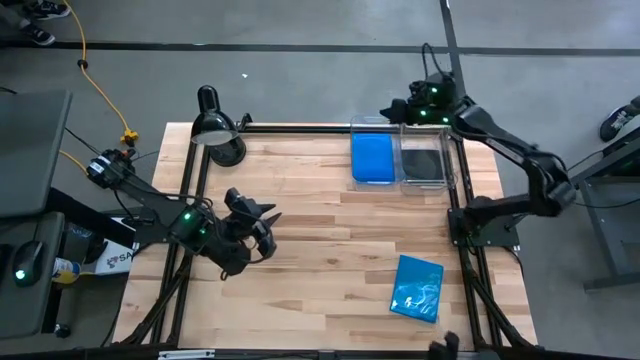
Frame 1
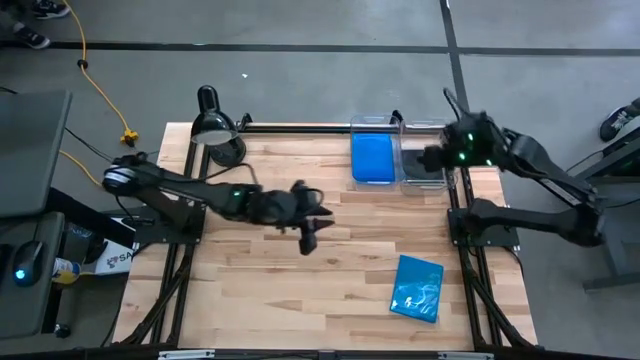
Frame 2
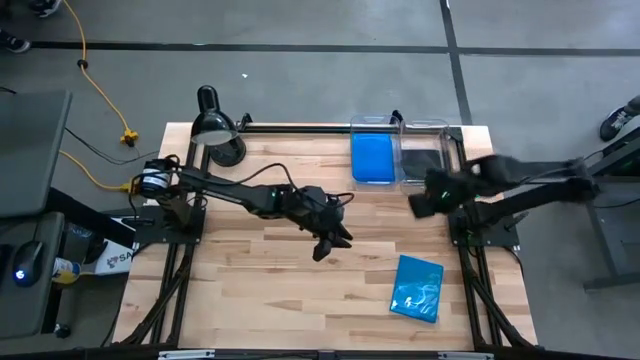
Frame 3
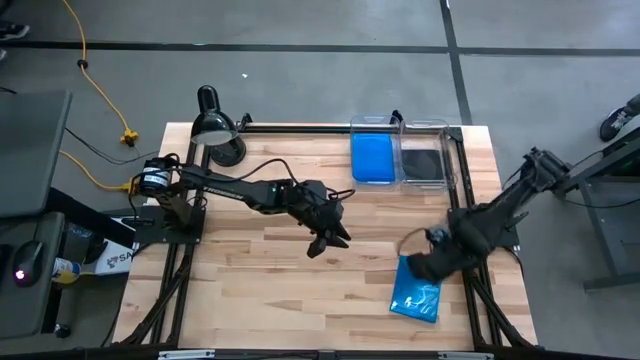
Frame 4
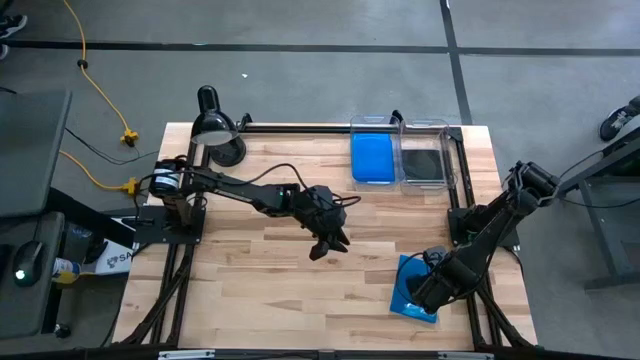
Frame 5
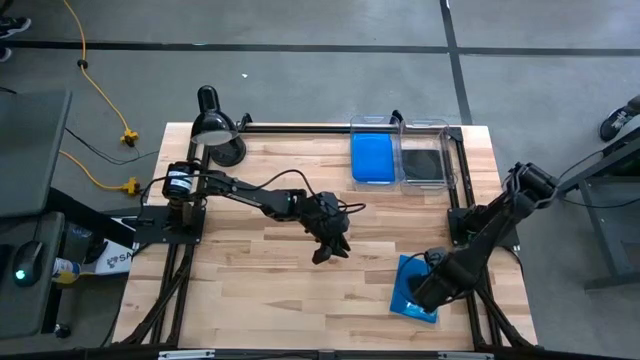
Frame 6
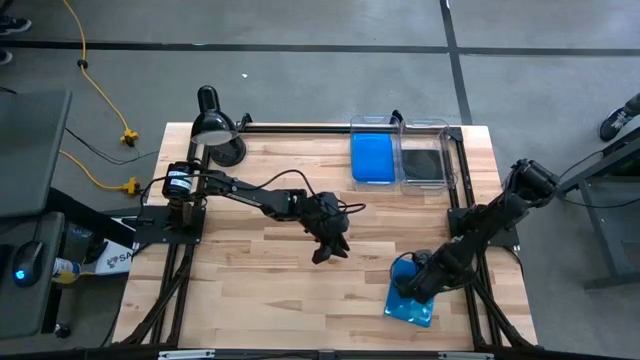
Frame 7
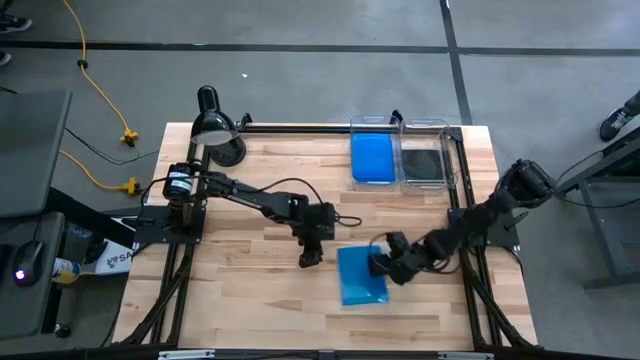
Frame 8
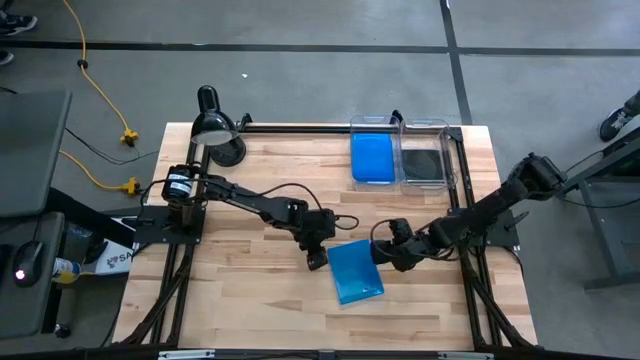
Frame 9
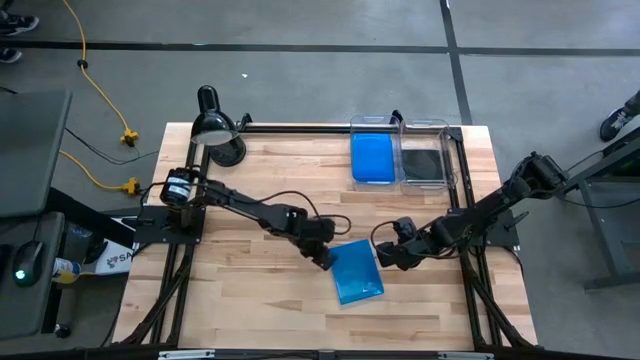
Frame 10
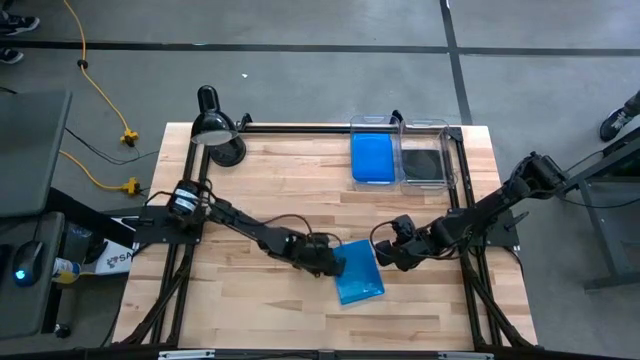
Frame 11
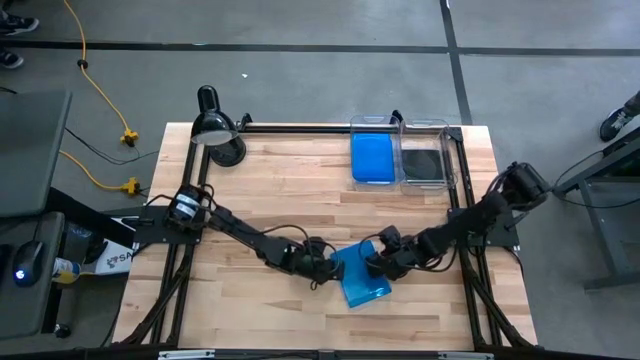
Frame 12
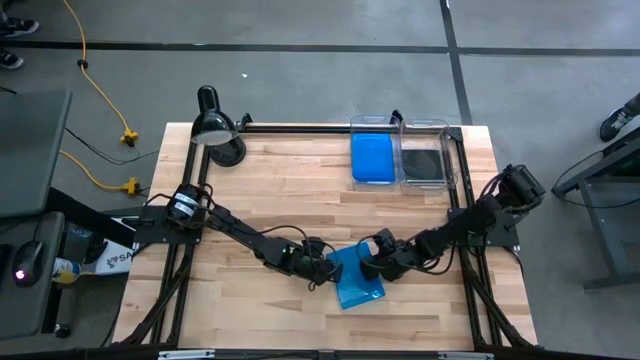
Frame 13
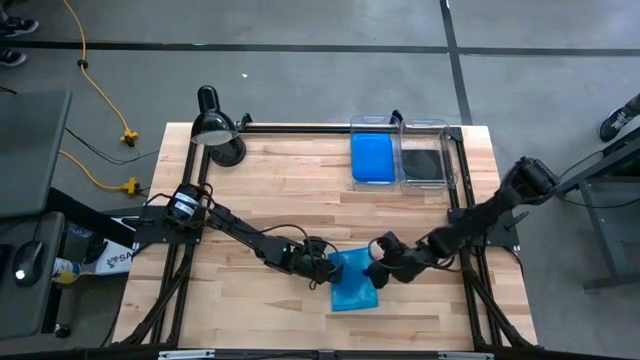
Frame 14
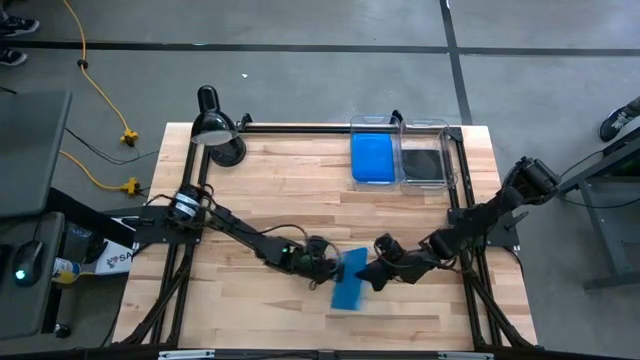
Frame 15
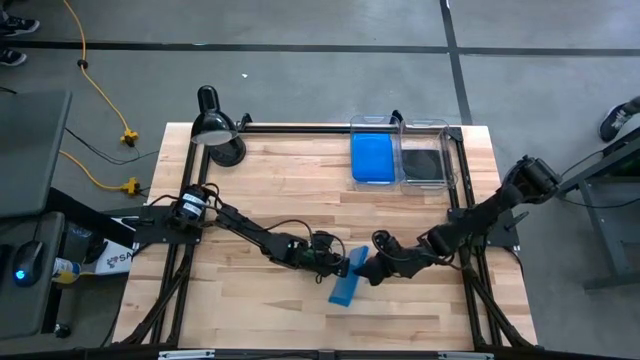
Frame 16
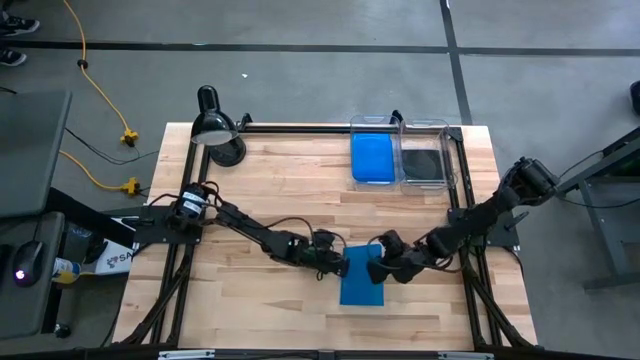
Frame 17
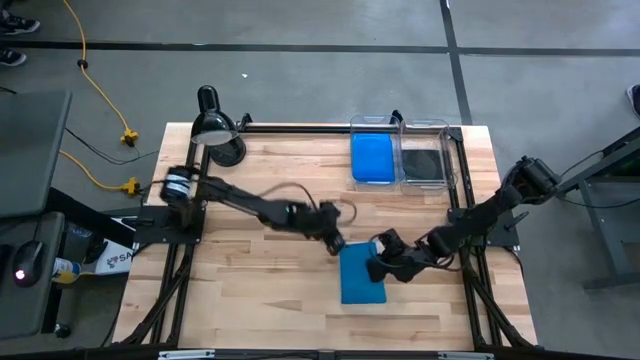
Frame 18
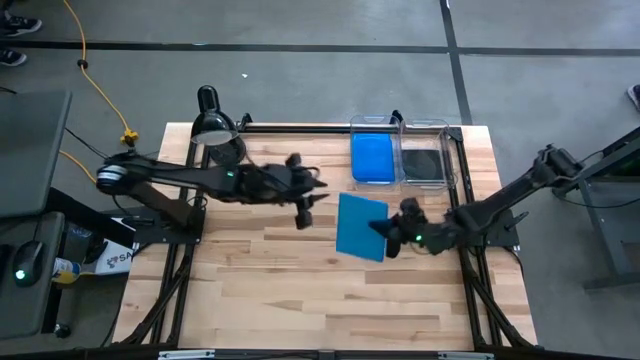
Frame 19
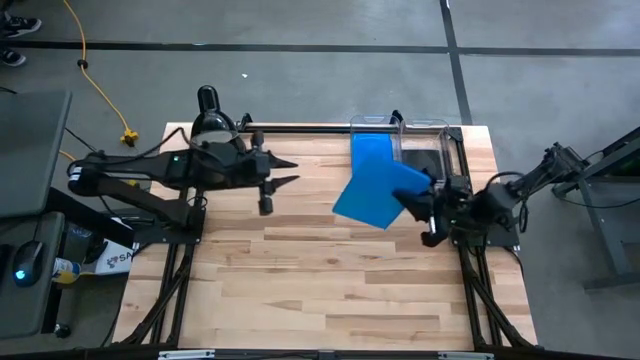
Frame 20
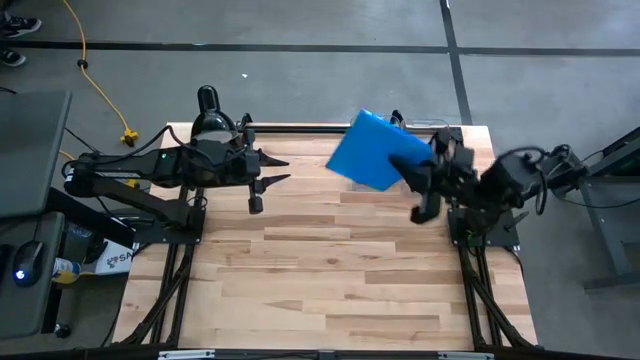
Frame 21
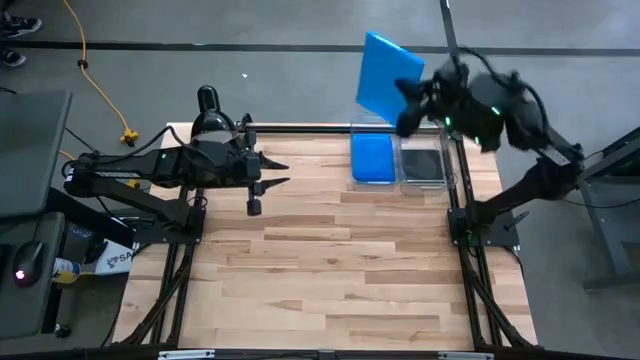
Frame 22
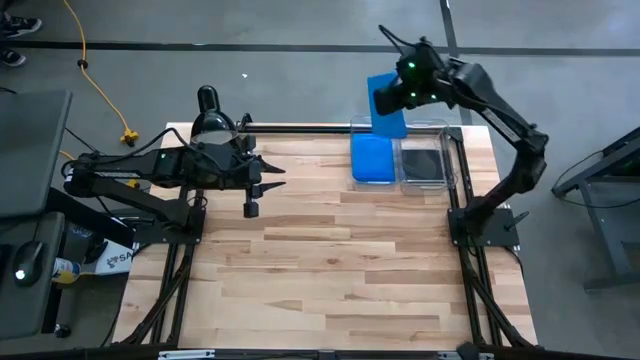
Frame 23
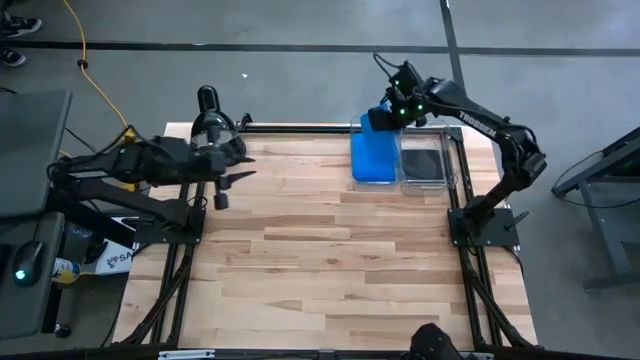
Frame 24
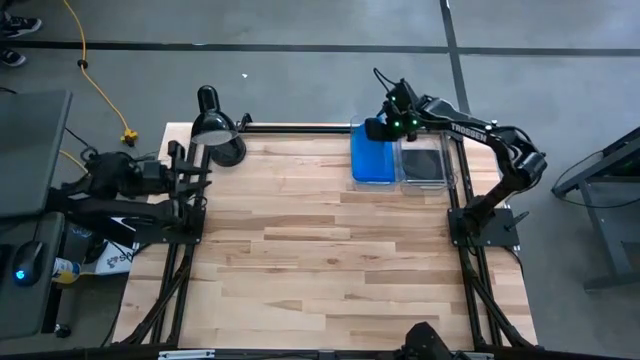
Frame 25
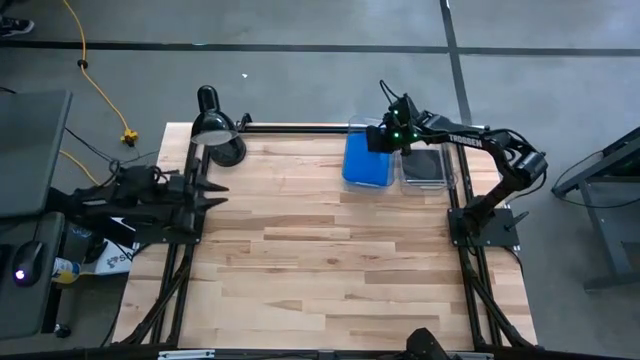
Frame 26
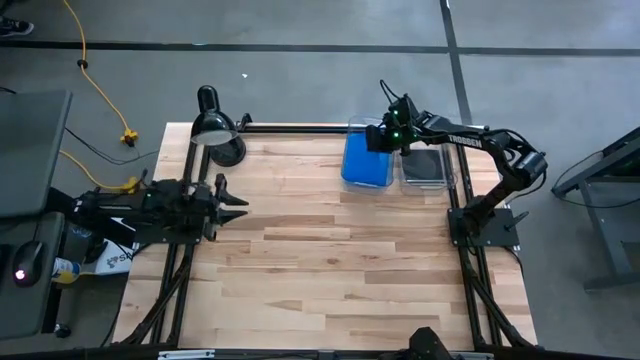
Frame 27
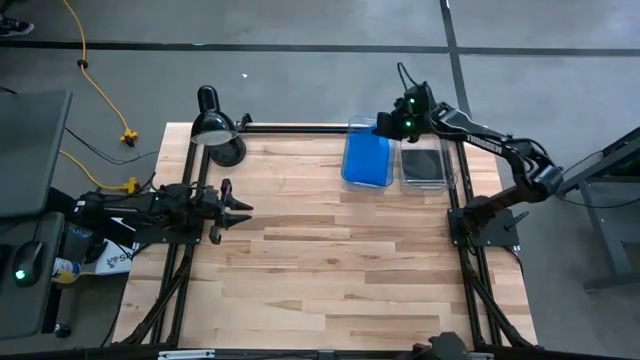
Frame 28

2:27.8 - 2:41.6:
Task: Pick & place jewel cases by type
Put the blue CD case into the left transparent bin

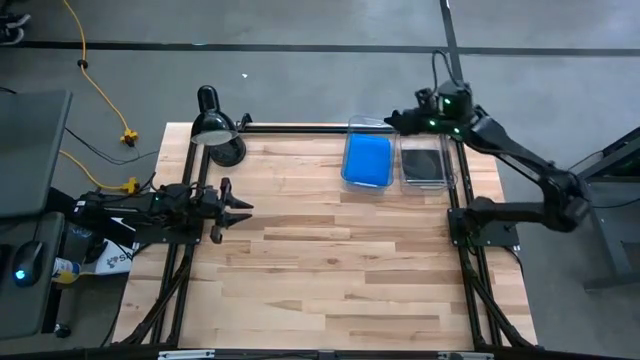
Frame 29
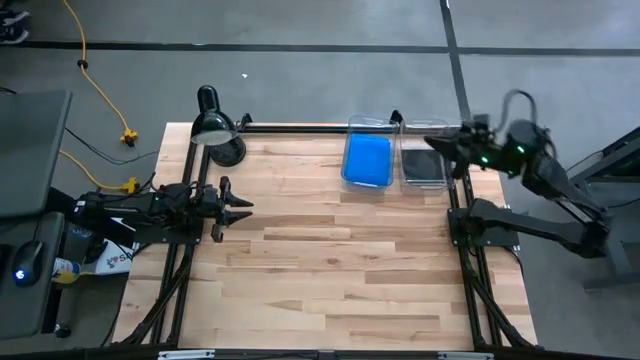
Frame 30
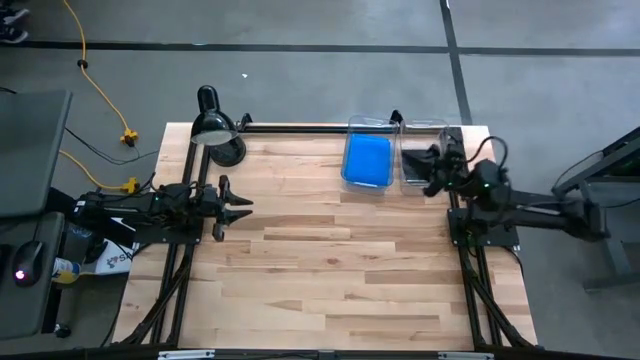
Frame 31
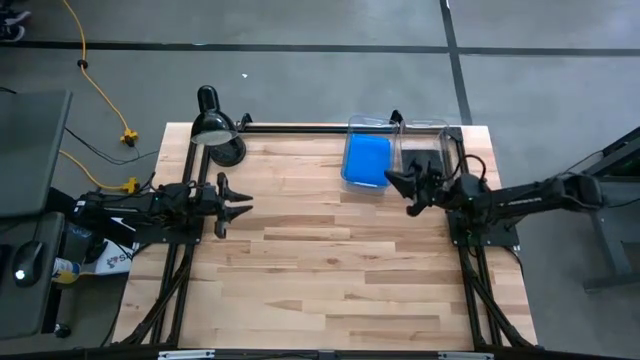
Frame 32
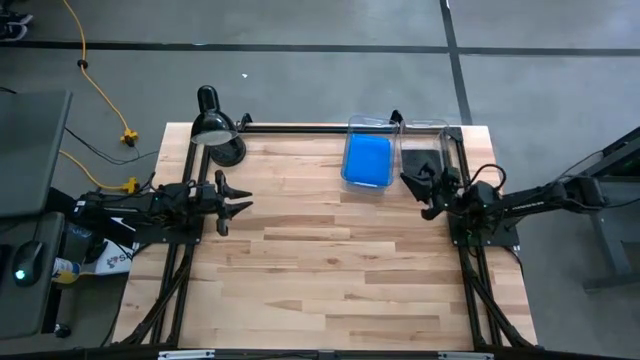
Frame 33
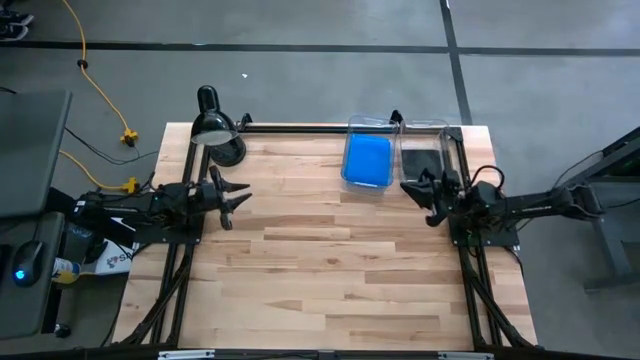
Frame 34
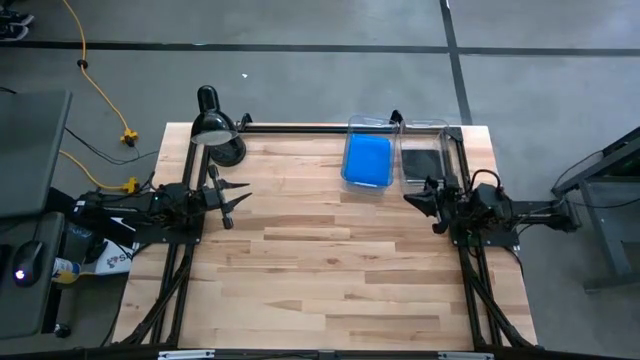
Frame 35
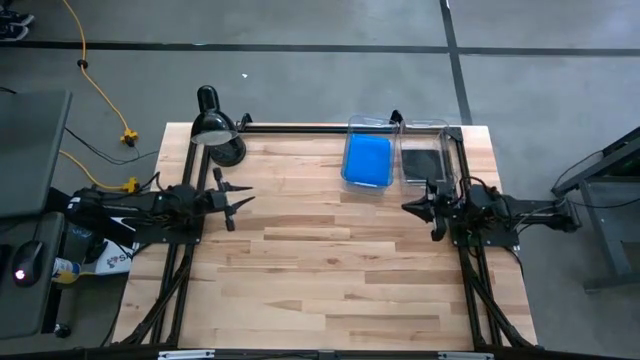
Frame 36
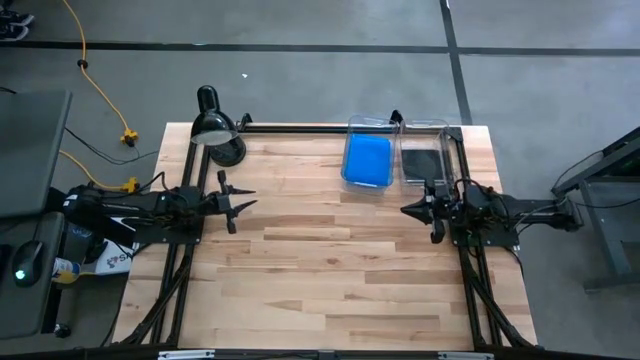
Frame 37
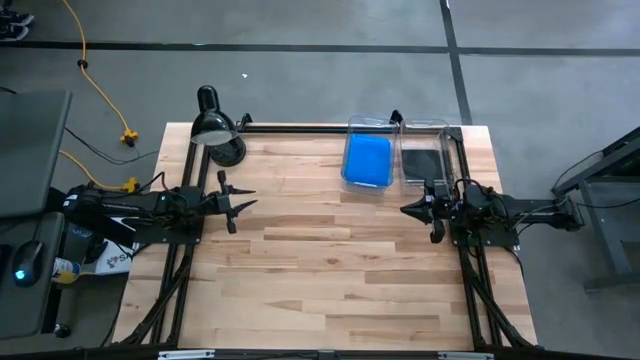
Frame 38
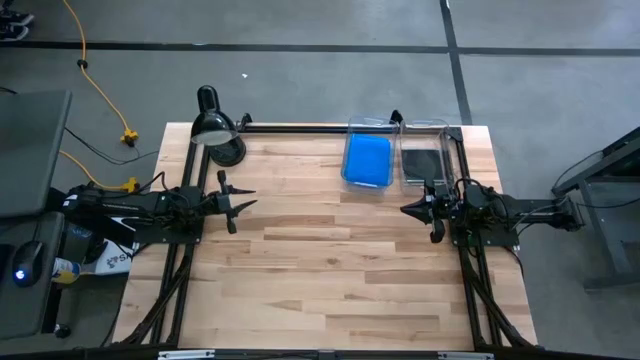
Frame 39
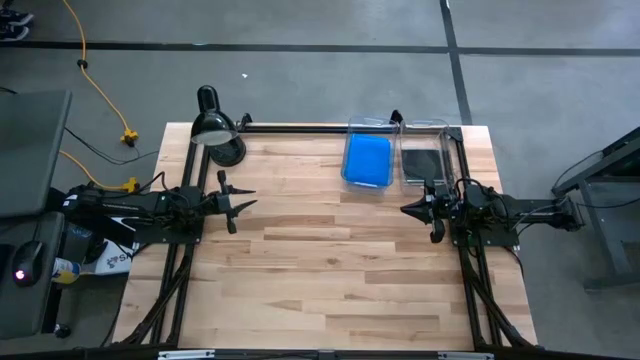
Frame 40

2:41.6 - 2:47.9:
Return to Home Position
